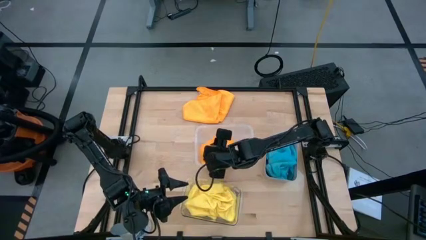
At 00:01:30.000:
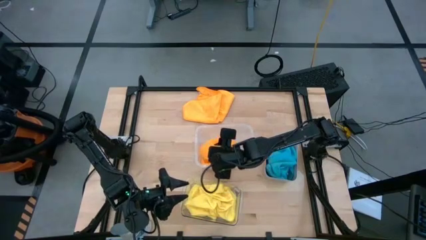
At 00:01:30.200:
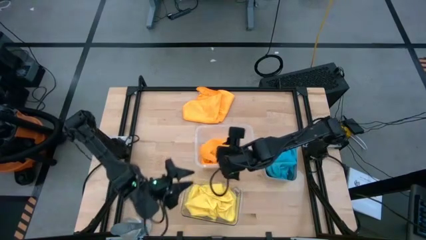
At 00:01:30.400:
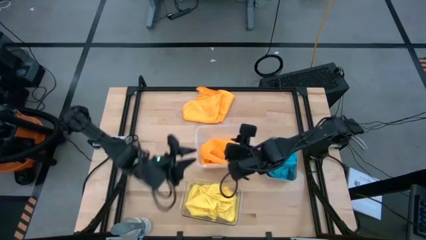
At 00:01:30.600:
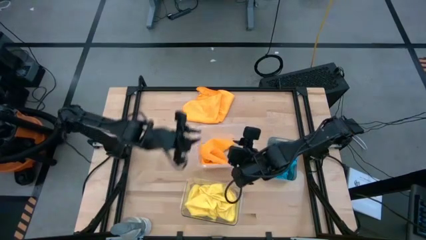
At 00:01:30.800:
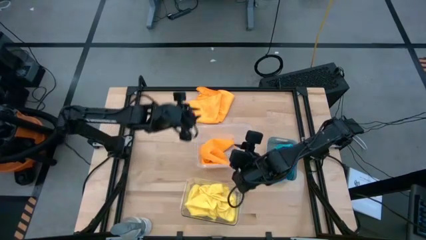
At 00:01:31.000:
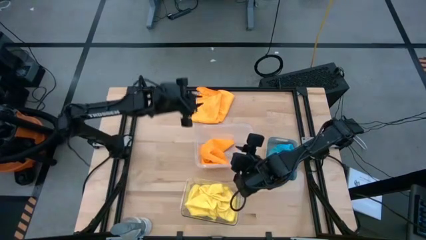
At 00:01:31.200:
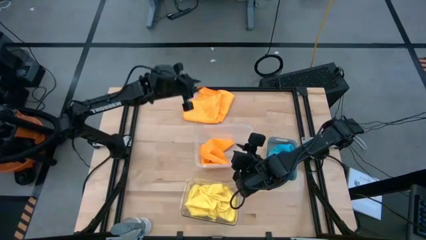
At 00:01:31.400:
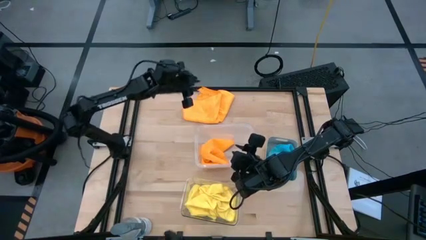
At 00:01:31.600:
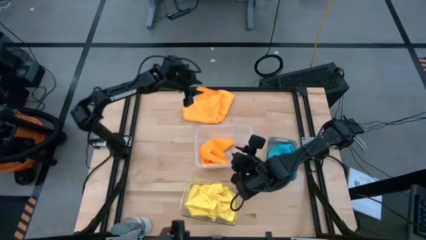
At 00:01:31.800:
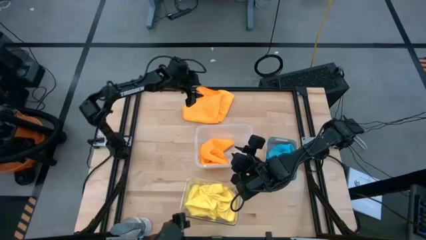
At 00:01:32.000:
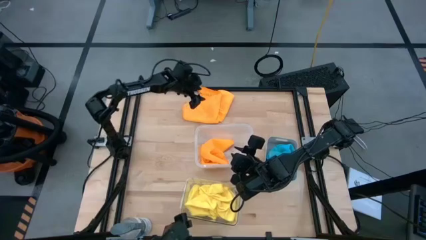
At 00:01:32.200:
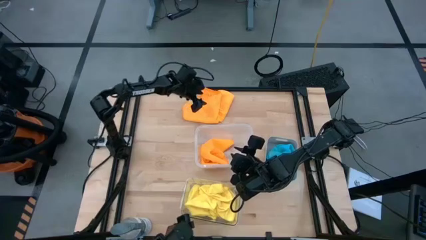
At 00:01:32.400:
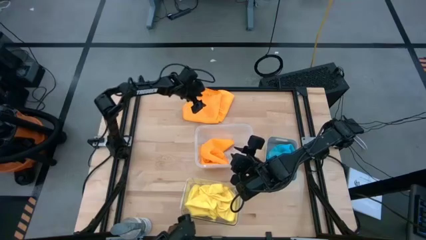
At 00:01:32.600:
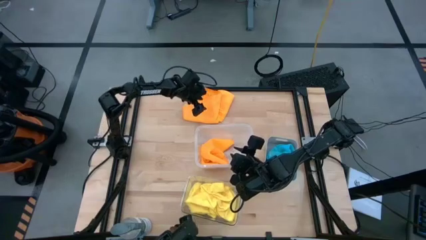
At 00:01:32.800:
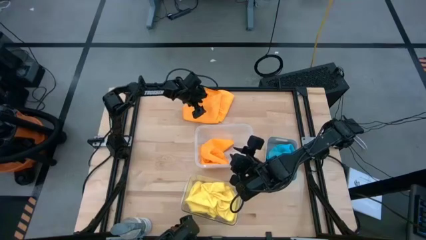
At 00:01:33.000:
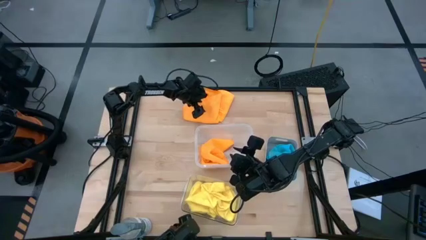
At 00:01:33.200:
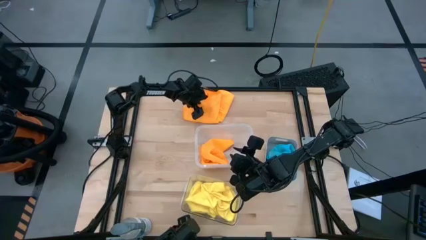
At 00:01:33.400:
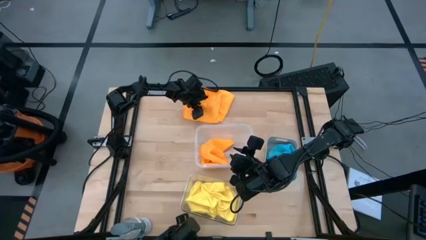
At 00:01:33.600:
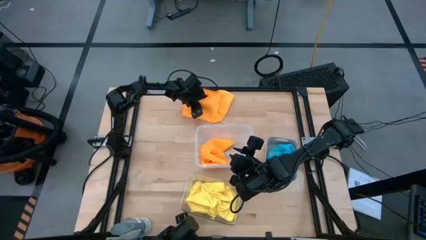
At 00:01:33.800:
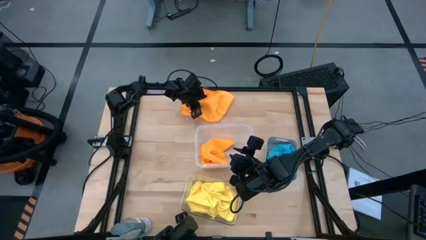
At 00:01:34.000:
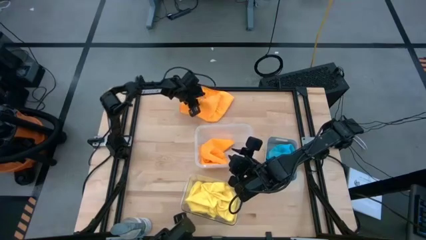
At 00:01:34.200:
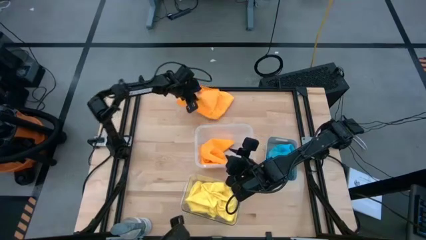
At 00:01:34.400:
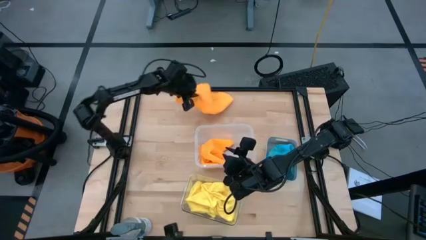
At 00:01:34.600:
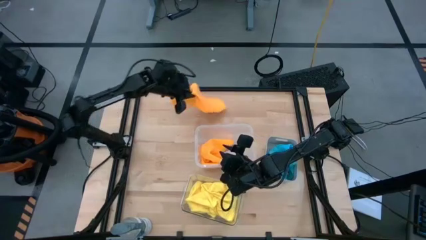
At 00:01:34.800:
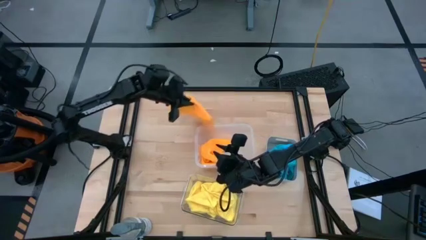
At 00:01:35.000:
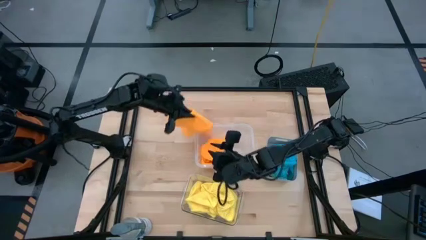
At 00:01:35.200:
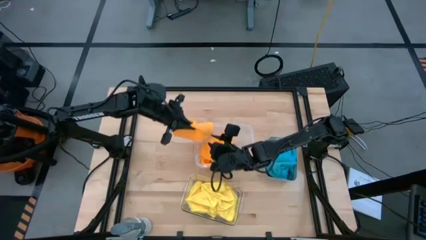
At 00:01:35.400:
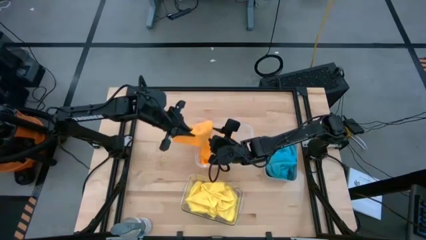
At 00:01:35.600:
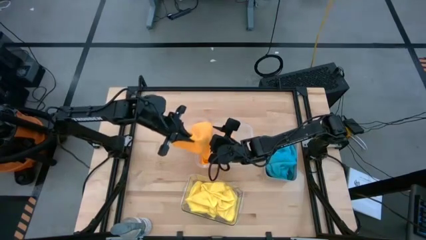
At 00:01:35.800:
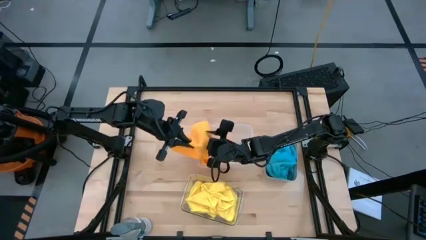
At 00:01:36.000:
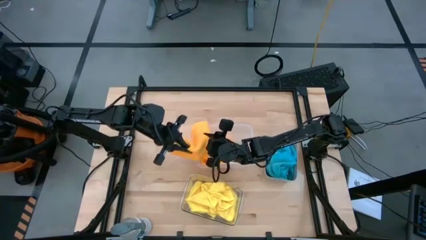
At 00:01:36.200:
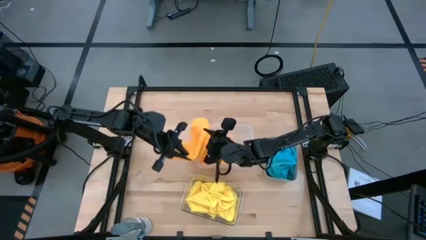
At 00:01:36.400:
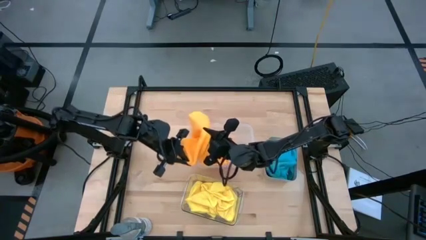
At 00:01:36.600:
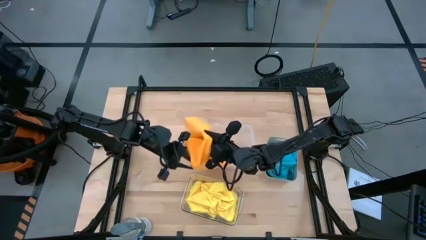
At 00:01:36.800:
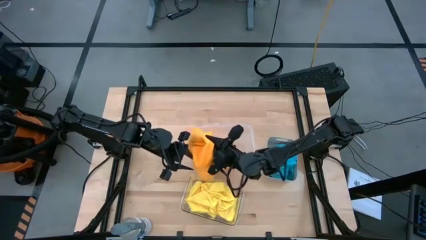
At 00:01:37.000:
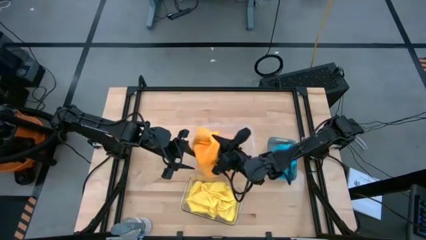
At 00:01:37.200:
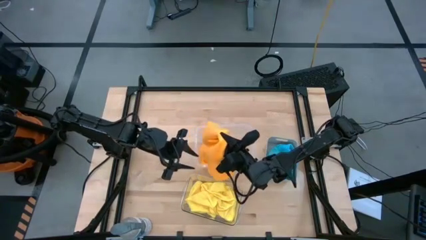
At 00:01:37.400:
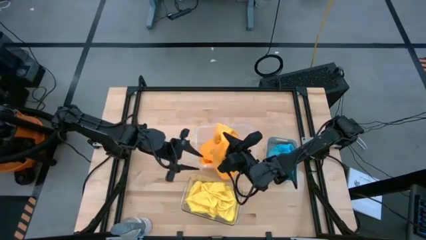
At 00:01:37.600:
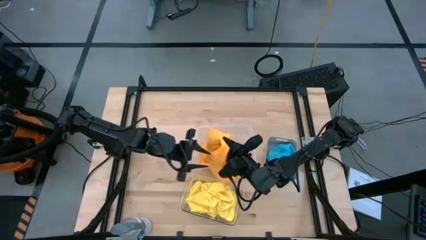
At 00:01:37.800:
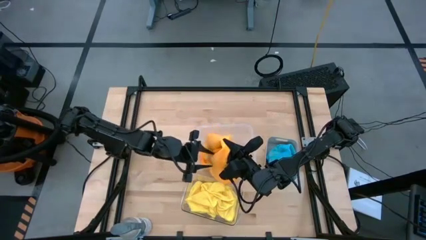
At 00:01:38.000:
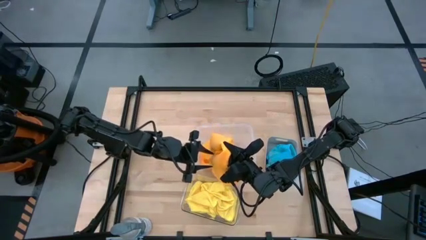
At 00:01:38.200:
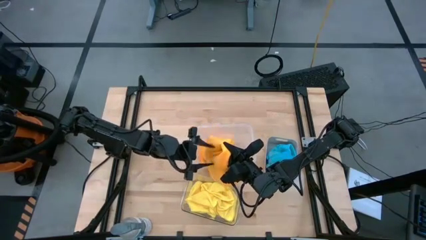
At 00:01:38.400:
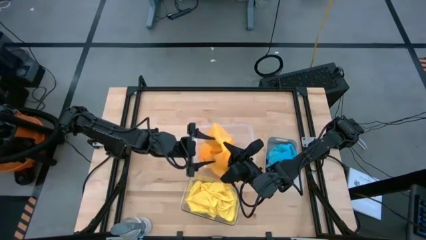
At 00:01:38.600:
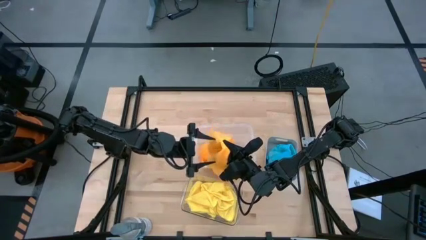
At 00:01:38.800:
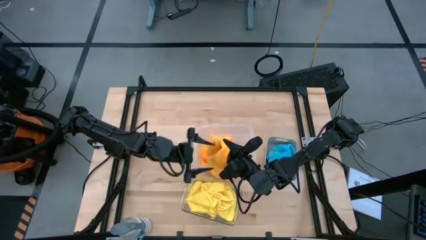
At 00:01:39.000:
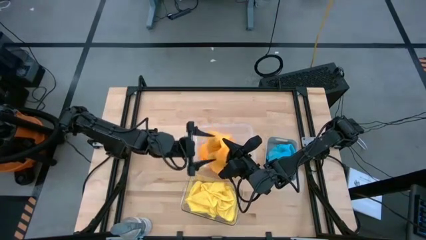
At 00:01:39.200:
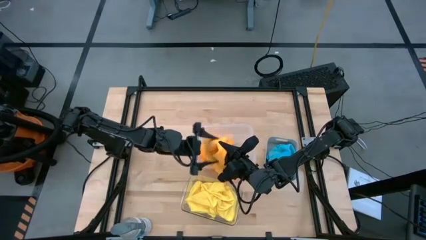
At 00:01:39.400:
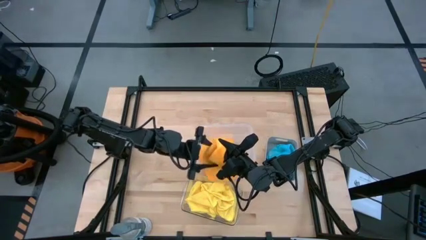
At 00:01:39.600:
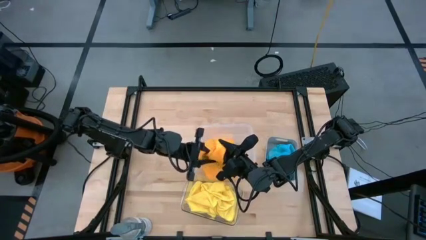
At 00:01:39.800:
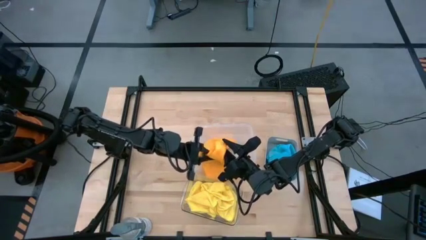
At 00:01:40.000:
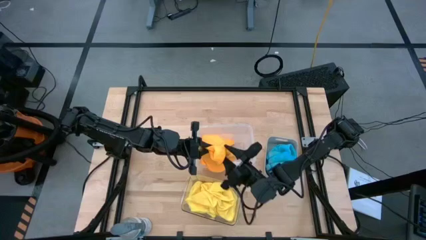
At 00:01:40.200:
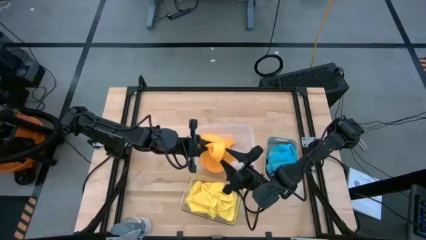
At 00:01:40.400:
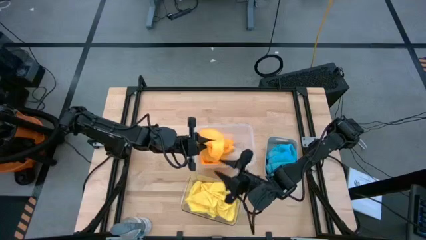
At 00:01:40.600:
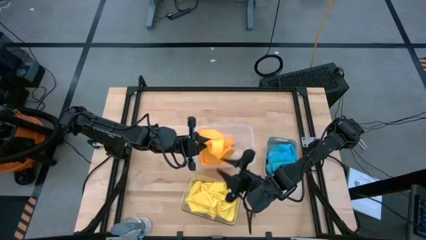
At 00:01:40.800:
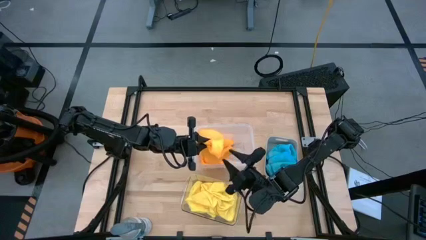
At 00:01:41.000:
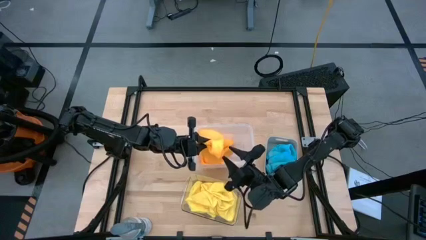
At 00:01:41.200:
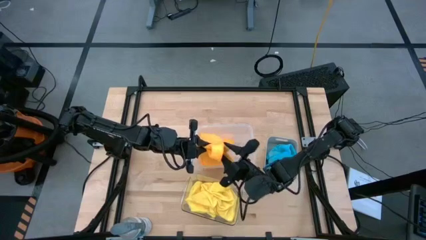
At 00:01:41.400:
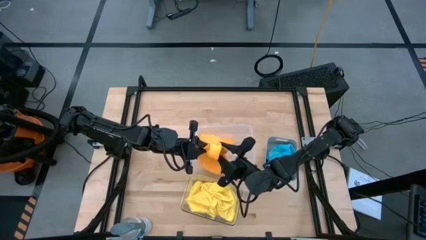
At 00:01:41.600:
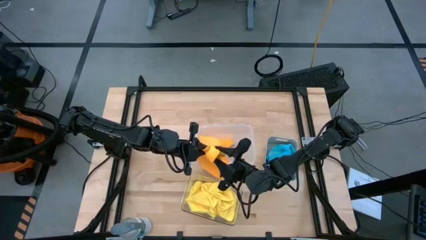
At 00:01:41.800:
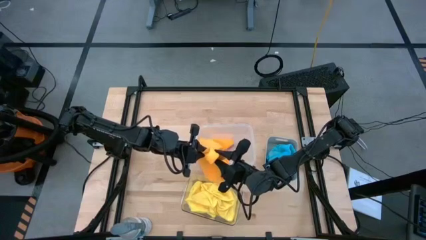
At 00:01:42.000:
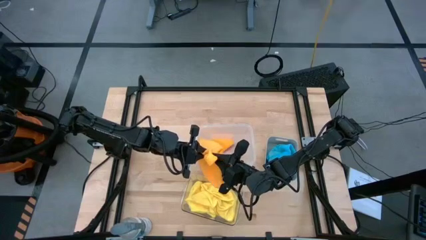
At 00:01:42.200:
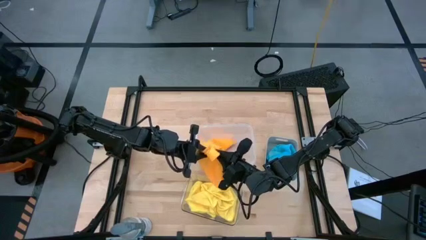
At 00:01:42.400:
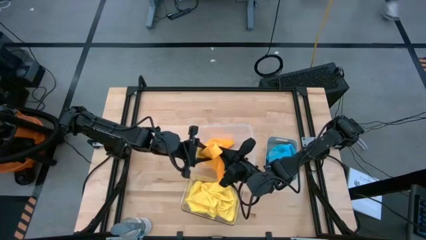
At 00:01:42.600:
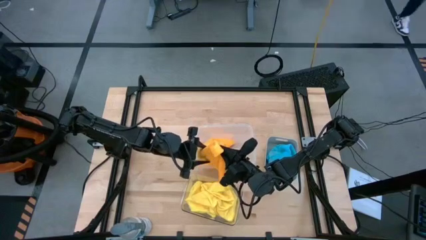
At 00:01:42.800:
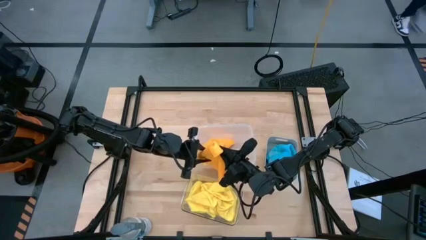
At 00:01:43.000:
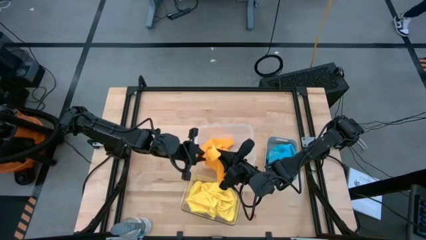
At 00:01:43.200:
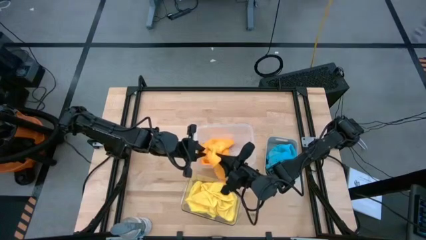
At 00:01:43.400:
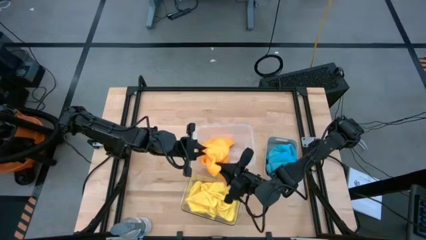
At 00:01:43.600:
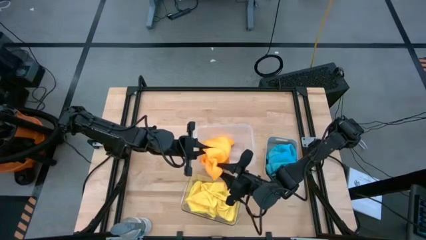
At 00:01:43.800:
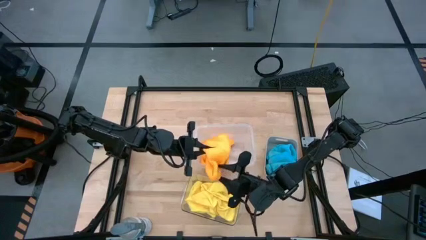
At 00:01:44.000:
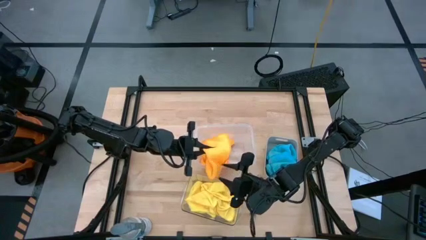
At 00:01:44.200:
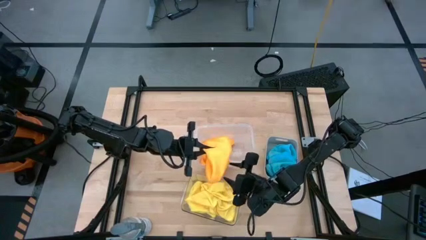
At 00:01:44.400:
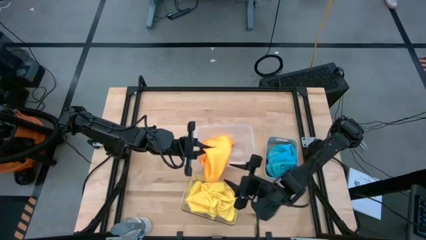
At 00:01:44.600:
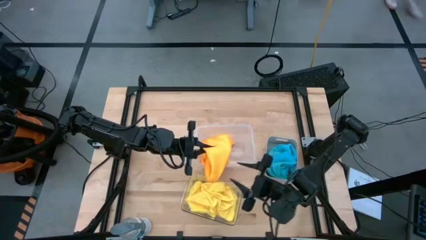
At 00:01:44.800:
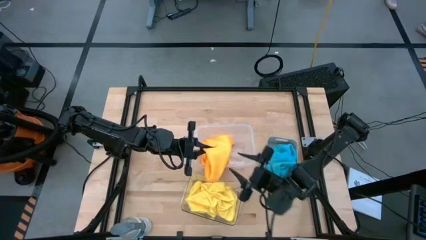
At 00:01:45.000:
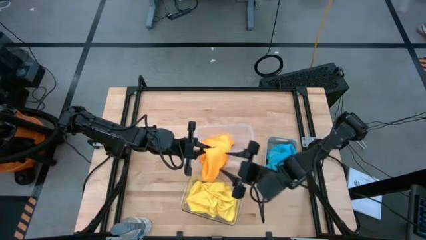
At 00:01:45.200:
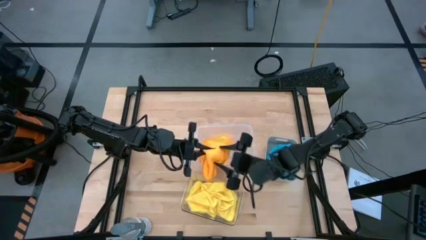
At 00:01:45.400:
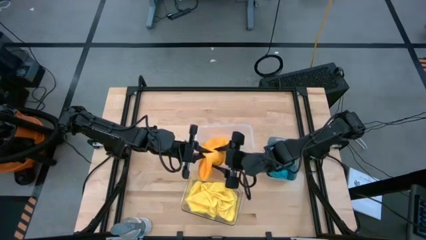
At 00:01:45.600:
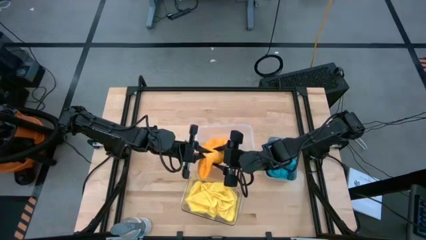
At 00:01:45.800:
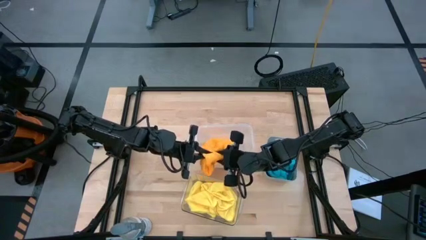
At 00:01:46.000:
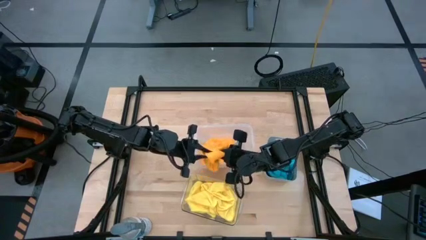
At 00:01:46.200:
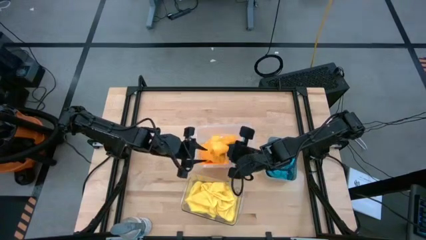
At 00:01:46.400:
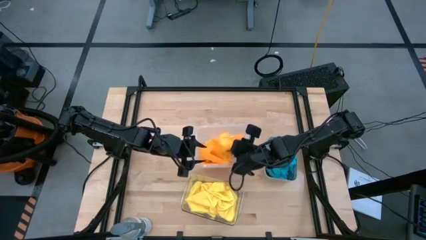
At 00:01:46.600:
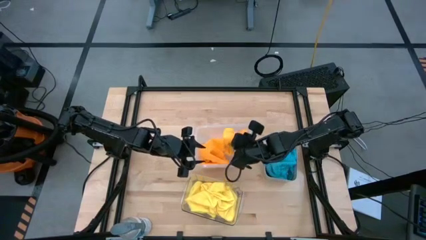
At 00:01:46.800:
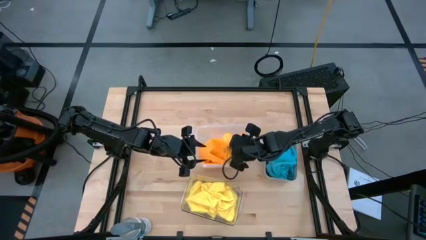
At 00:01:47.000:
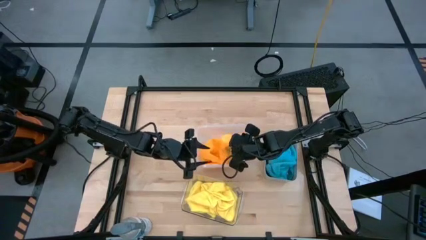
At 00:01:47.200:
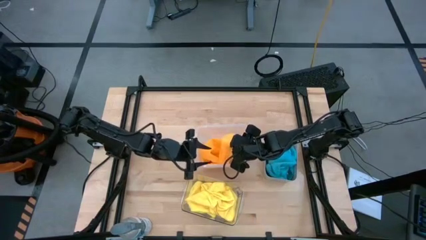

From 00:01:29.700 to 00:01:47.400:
Task: Sort microfiber towel by color & place in baskets
Put the orange microfiber cloth into the white transparent bin
